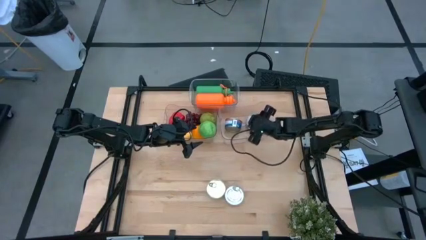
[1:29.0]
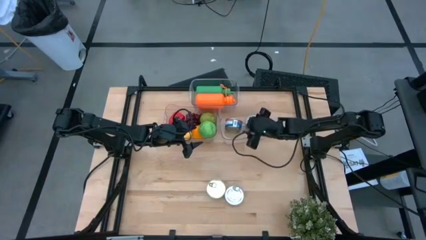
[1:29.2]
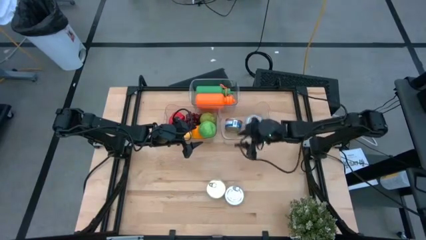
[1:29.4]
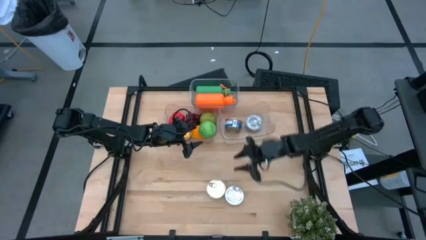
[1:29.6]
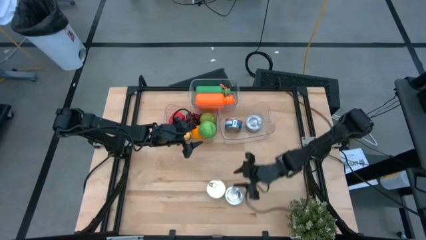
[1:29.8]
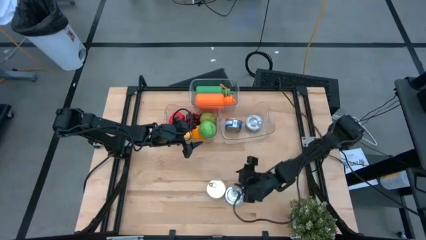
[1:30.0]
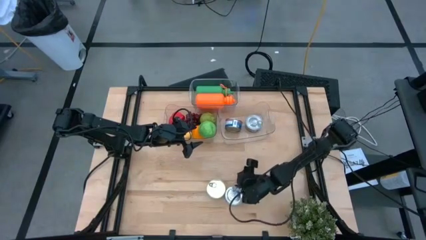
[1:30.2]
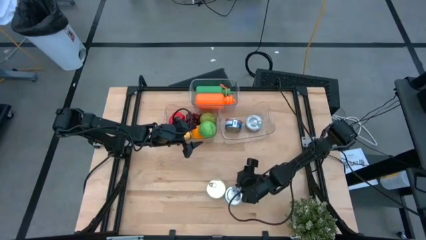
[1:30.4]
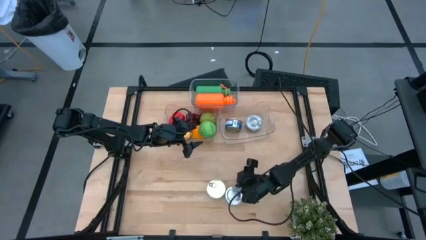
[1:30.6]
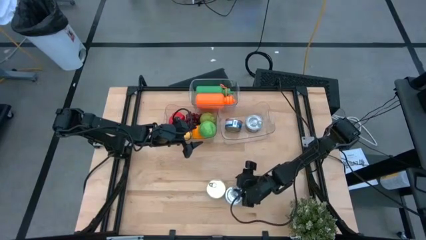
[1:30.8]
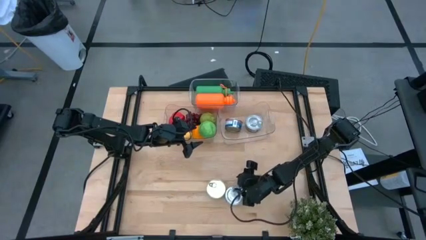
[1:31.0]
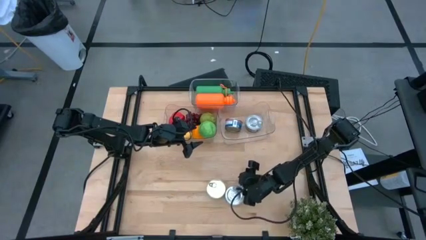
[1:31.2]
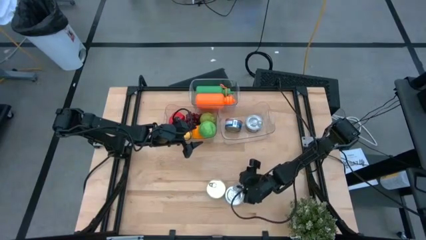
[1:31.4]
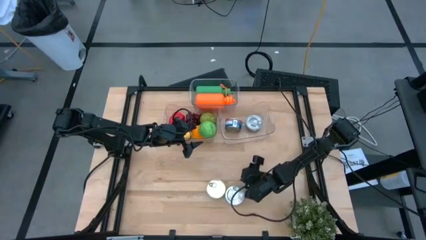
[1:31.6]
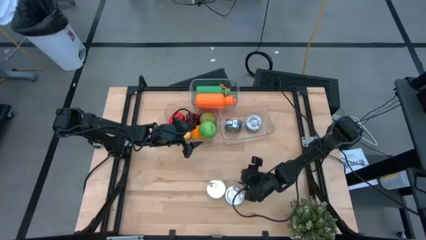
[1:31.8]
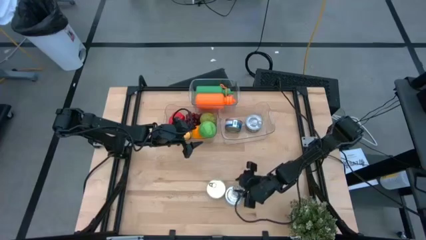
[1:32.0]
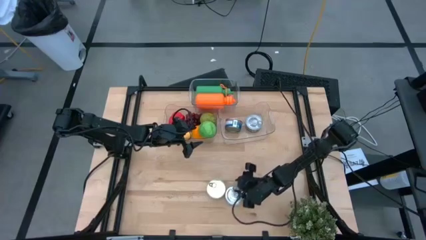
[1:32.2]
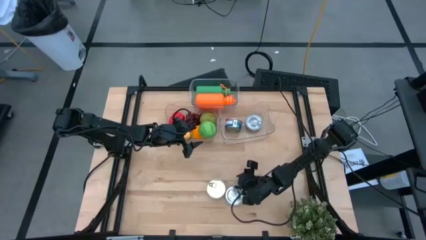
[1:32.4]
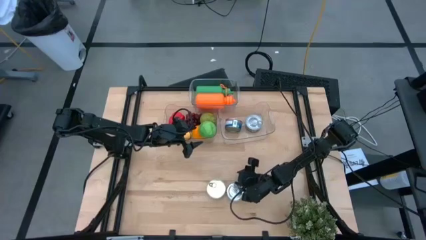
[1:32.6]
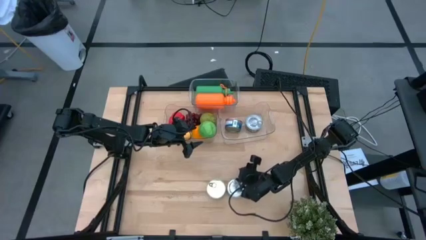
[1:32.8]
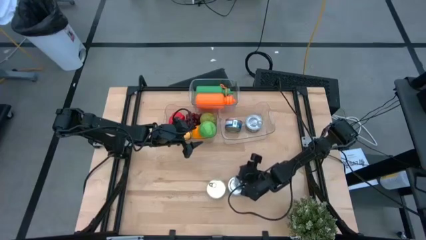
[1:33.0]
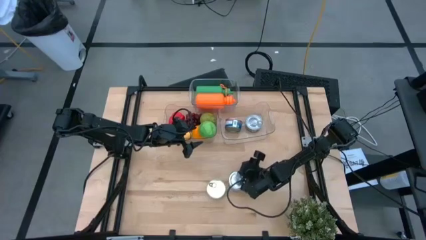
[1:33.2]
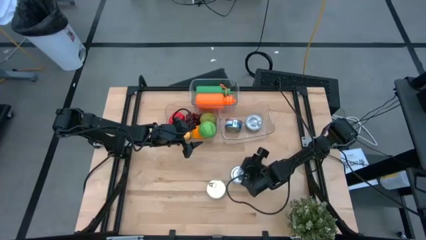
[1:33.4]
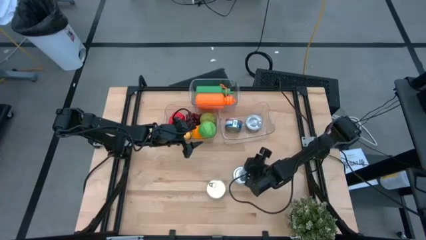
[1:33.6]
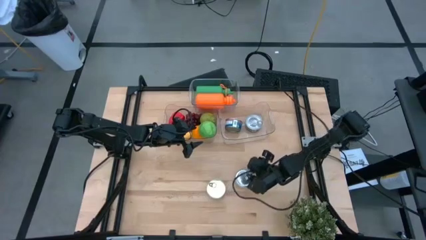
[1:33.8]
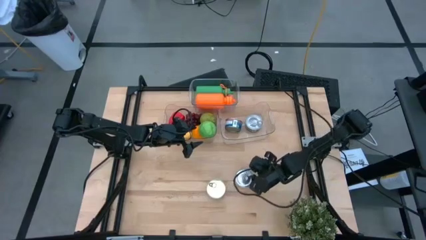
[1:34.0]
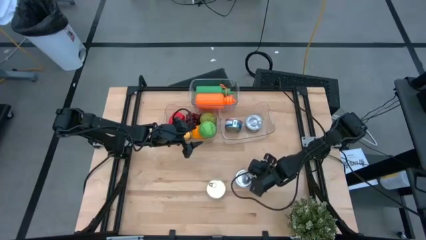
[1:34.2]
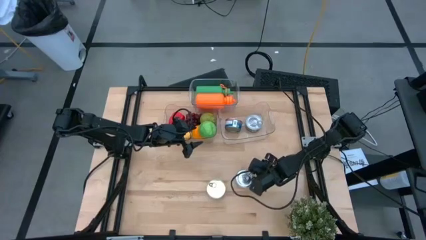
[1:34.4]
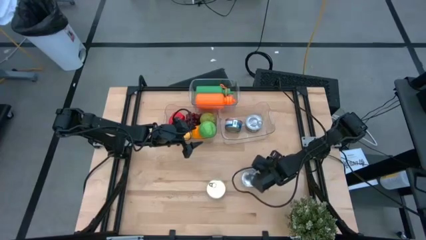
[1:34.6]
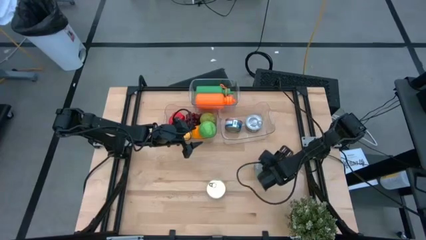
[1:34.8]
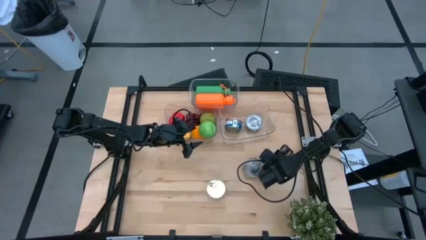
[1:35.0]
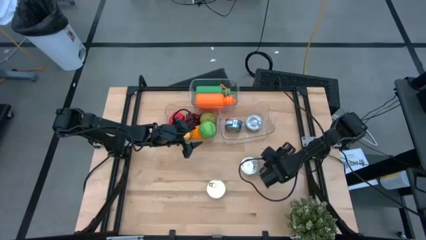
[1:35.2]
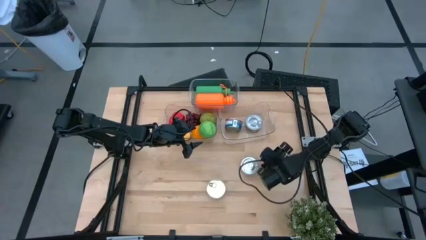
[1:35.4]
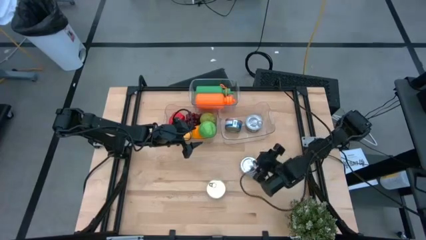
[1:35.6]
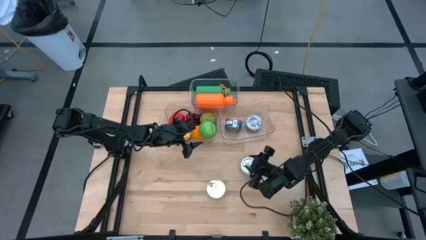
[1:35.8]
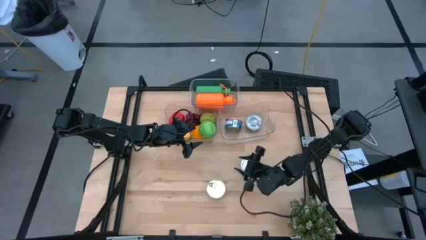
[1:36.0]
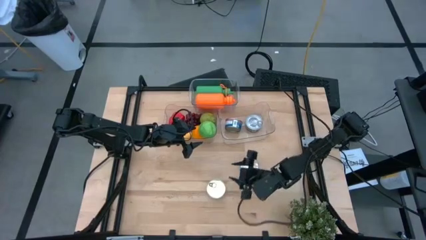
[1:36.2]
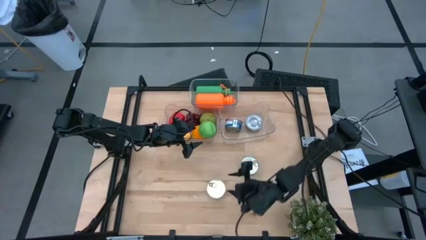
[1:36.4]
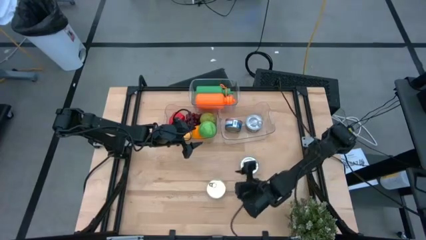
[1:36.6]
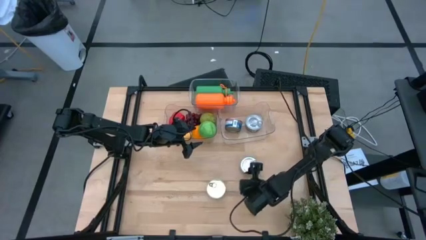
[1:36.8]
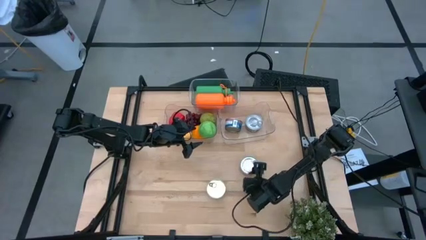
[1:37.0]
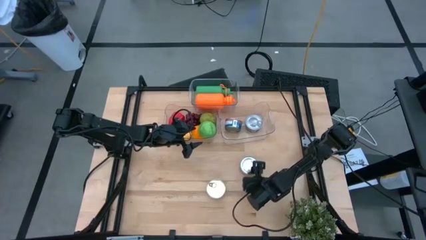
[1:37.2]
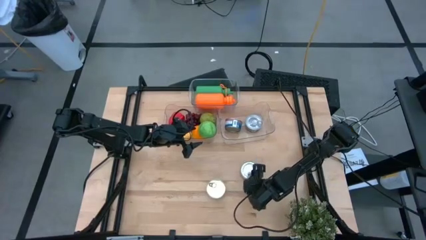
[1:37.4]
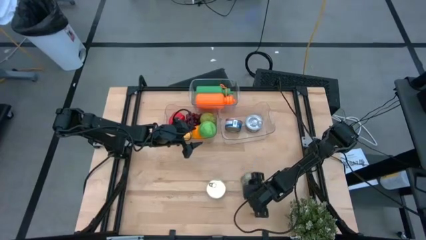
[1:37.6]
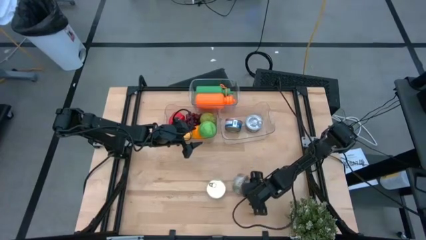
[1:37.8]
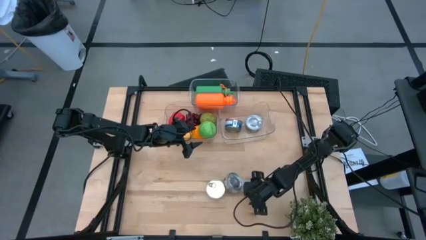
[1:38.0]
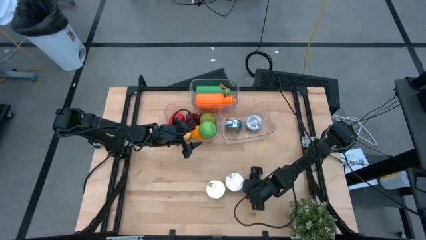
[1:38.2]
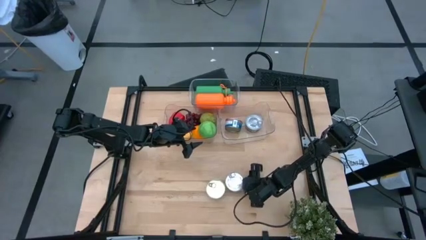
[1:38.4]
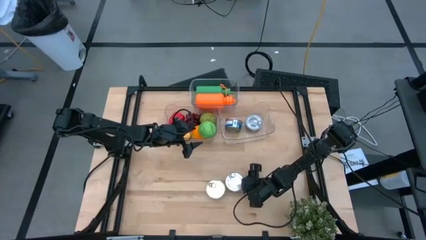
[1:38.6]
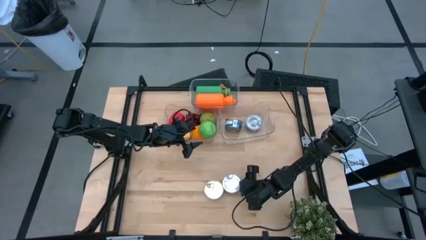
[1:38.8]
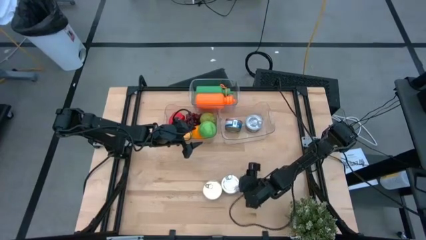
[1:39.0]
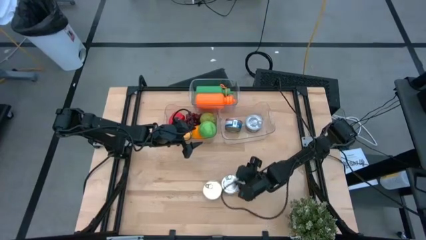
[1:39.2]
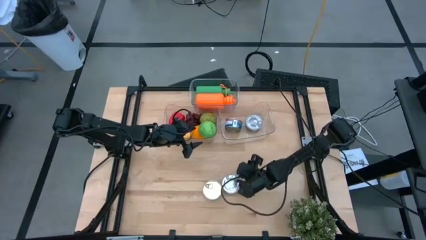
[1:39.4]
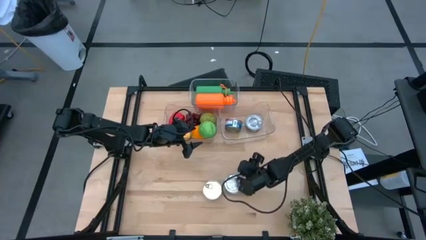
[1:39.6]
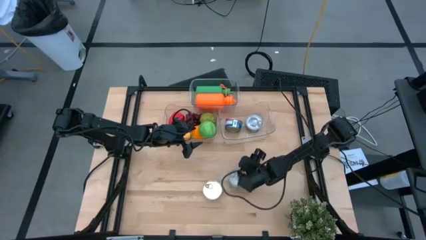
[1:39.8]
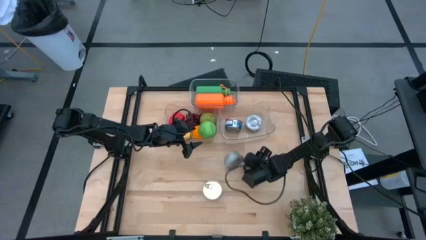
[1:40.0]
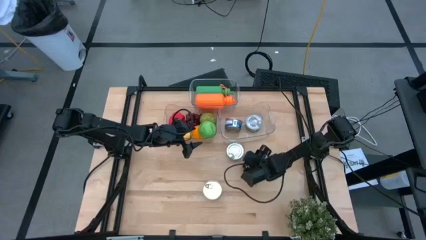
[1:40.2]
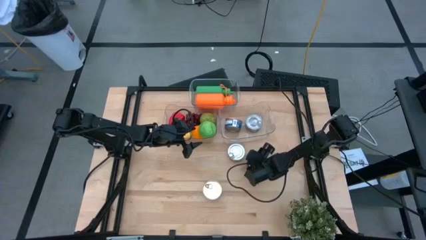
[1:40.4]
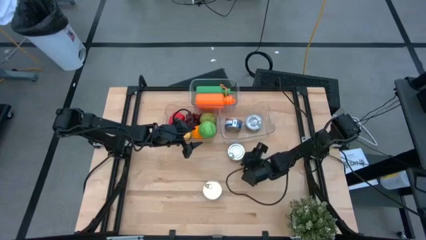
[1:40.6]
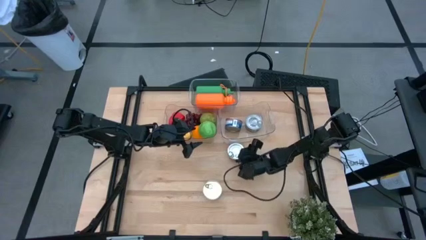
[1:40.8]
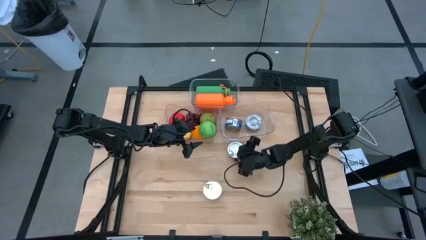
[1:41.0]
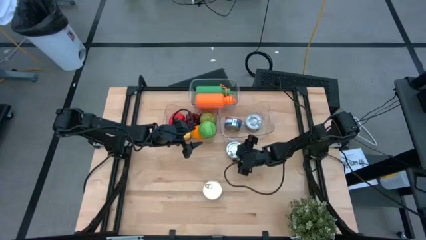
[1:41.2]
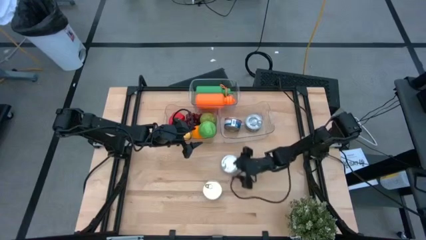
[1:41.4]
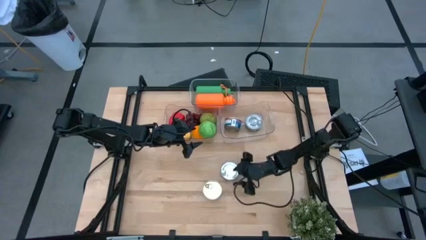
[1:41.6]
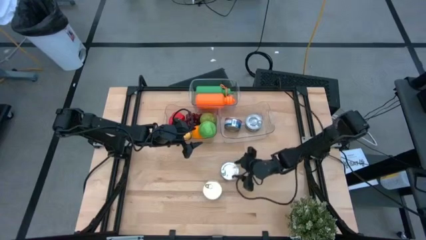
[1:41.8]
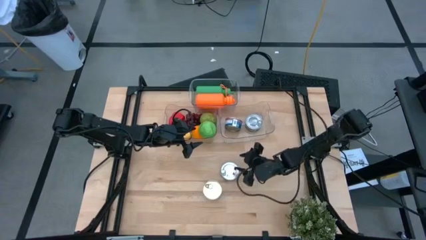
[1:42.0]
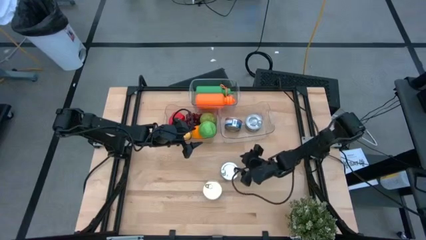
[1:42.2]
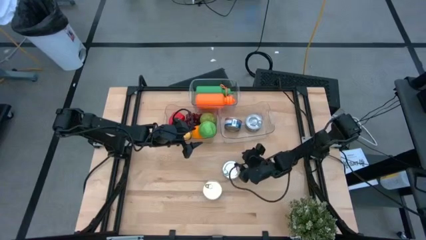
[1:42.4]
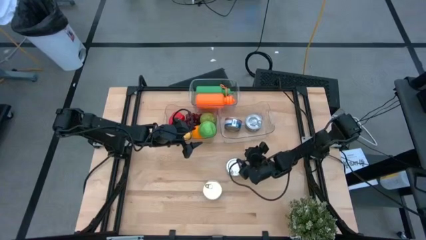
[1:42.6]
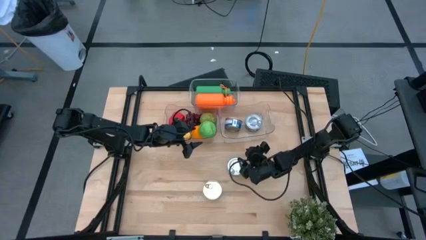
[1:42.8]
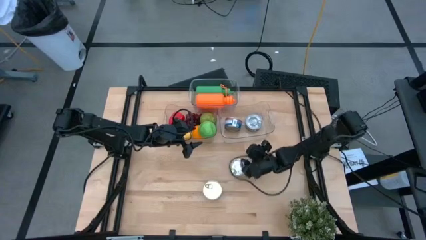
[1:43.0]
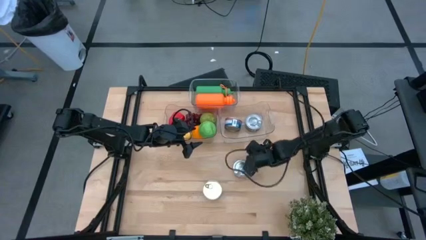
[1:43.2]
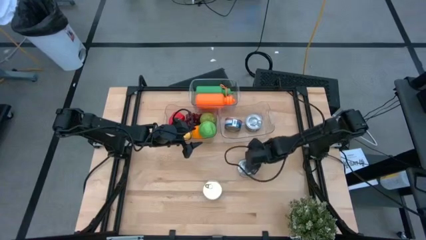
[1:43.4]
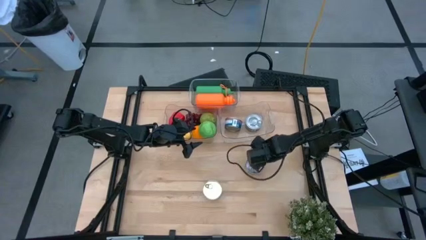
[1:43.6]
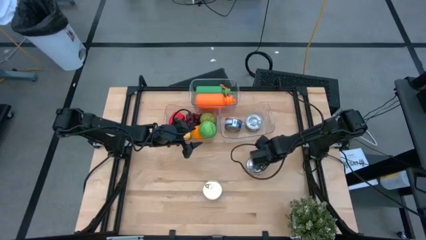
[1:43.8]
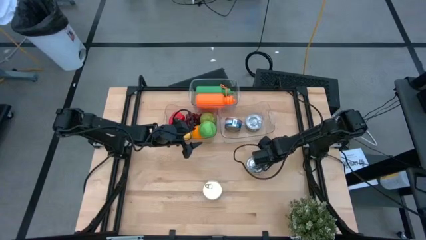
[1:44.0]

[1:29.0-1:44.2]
Task: Pick & Place Food Item
Put the green tuna can into the bottom right transparent bin

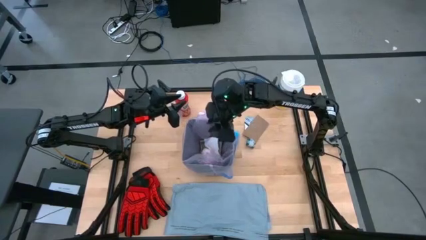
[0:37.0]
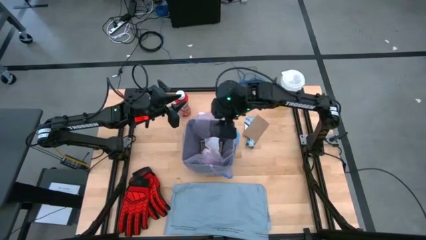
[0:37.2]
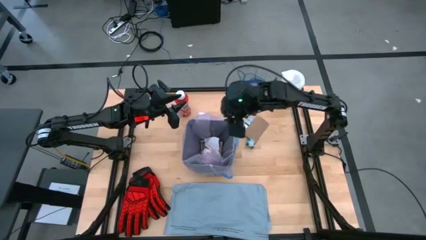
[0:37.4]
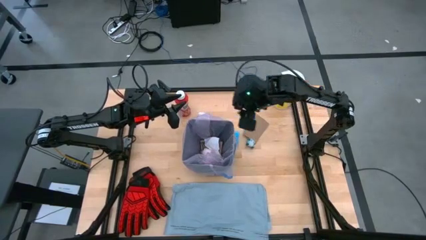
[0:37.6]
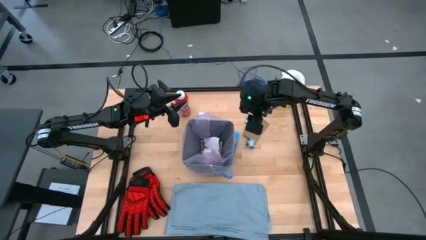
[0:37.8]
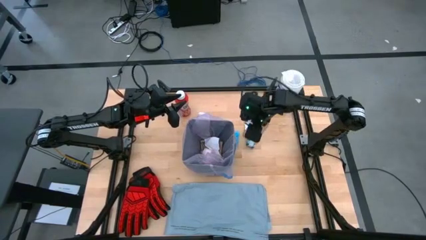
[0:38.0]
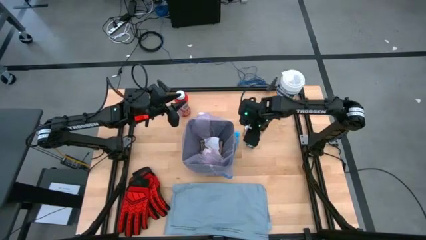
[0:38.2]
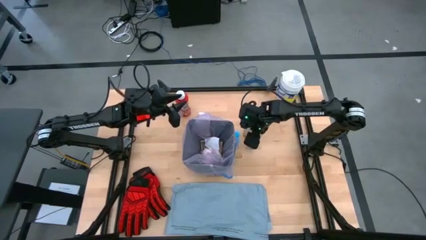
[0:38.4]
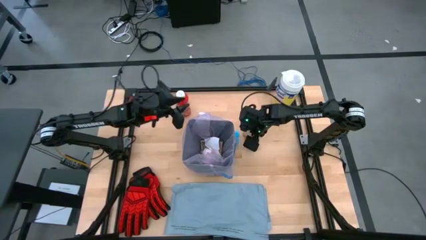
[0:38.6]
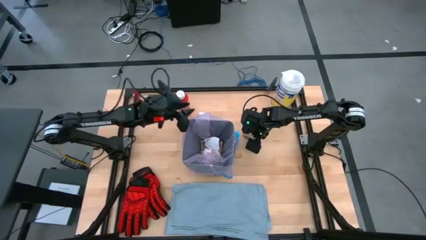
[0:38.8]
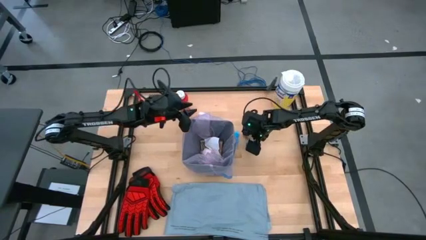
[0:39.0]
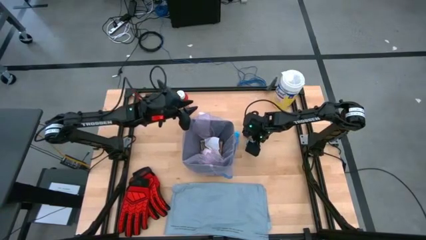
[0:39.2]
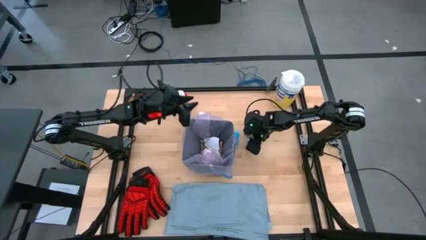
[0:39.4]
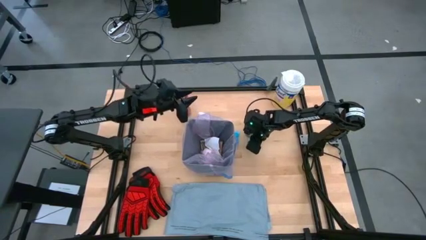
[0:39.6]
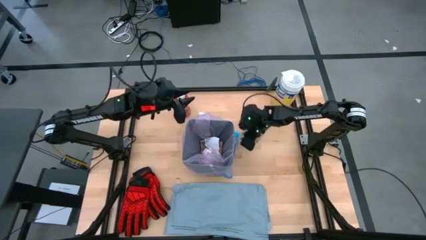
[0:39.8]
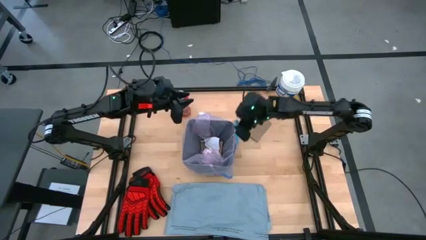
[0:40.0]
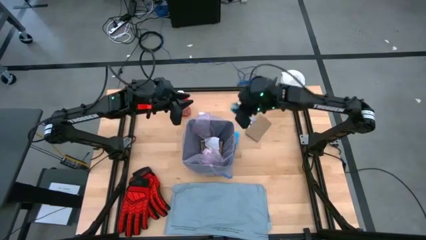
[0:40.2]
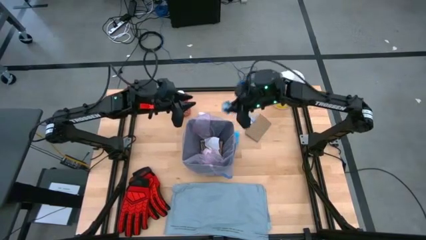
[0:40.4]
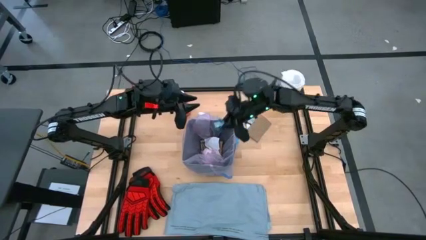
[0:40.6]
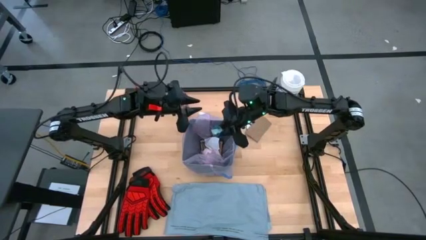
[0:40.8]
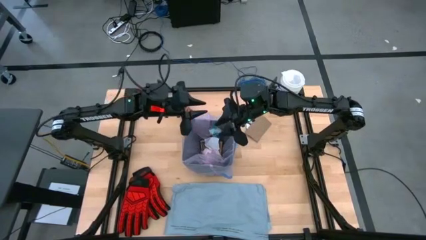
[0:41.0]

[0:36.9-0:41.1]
Task: place trash/remove bag and relplace
Put the blue plastic material into the trash bin
